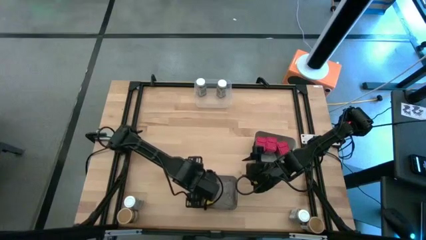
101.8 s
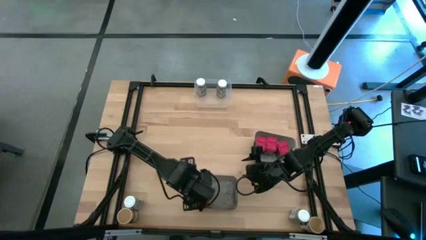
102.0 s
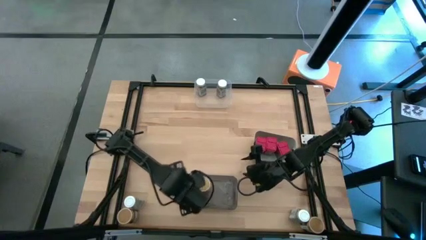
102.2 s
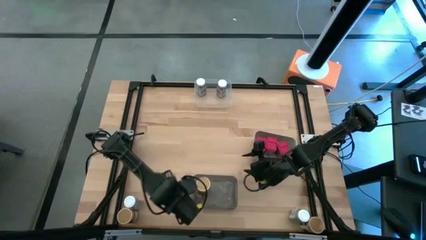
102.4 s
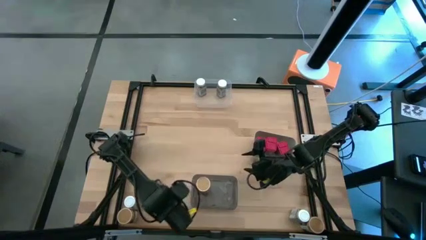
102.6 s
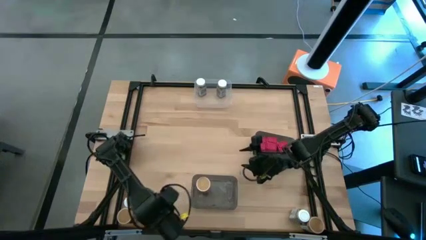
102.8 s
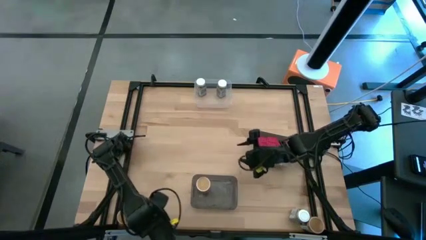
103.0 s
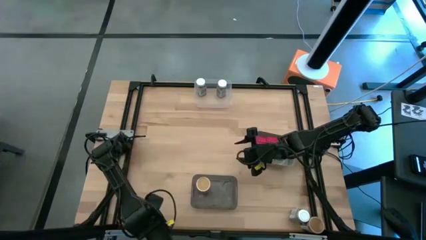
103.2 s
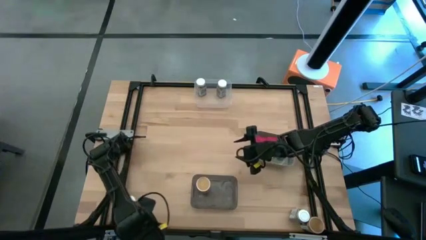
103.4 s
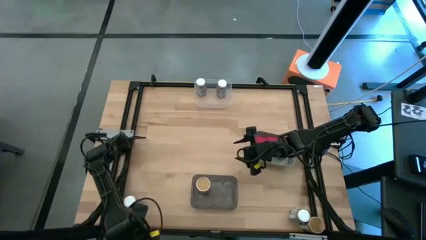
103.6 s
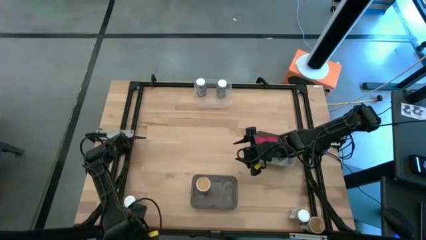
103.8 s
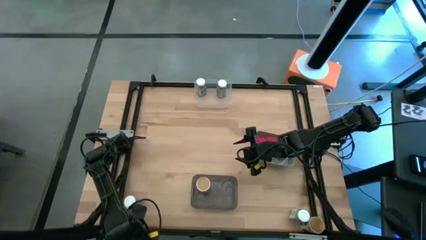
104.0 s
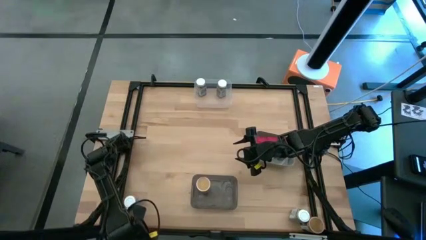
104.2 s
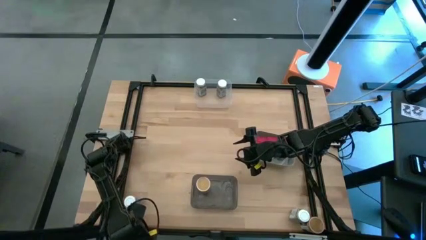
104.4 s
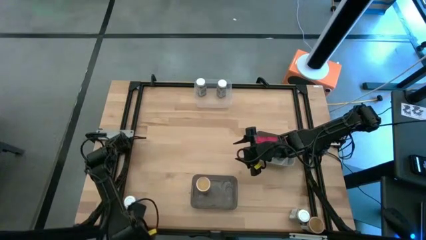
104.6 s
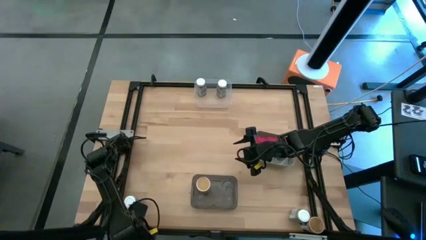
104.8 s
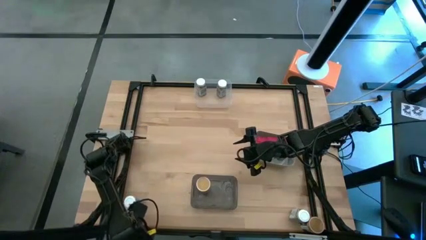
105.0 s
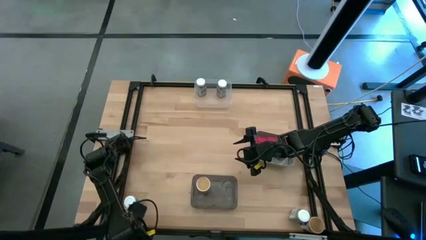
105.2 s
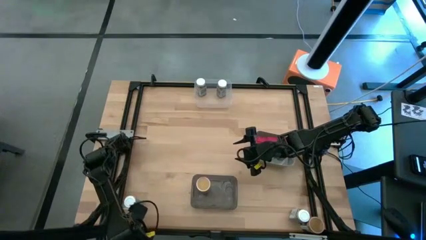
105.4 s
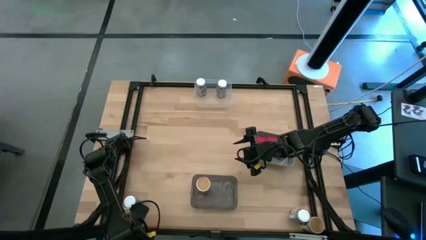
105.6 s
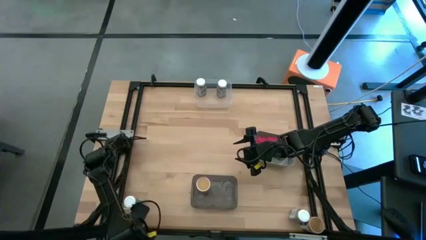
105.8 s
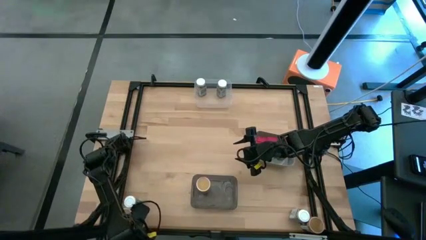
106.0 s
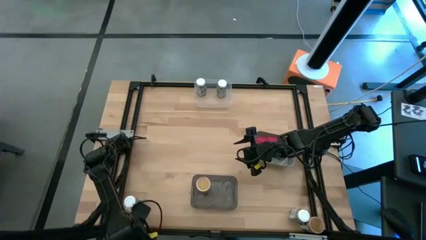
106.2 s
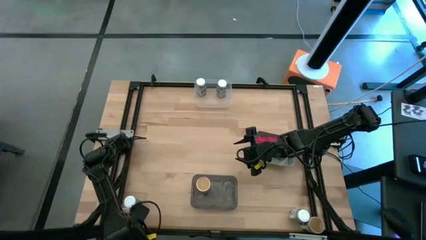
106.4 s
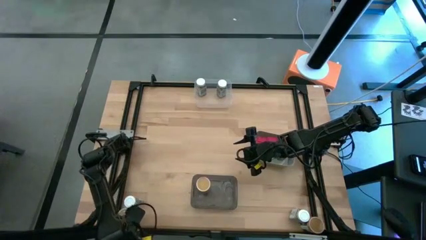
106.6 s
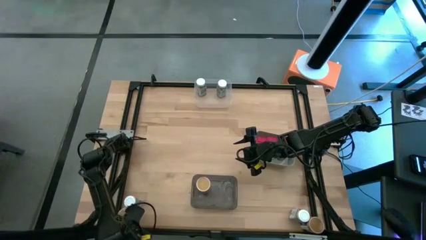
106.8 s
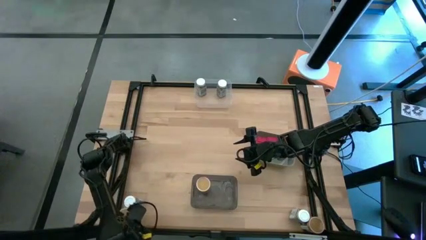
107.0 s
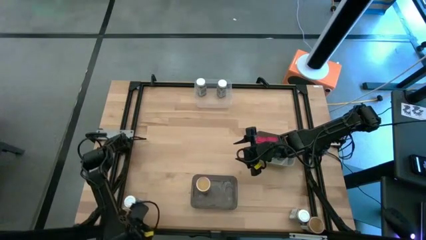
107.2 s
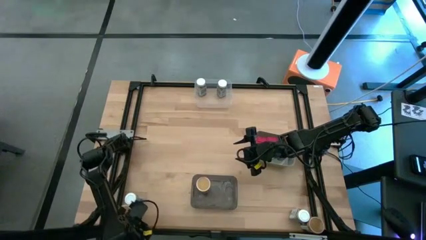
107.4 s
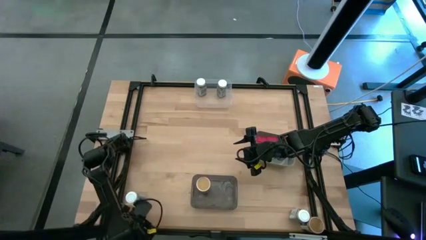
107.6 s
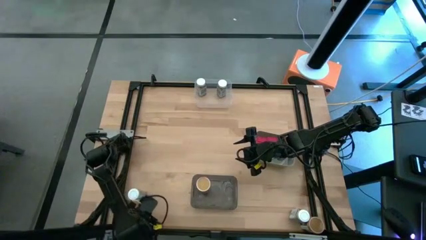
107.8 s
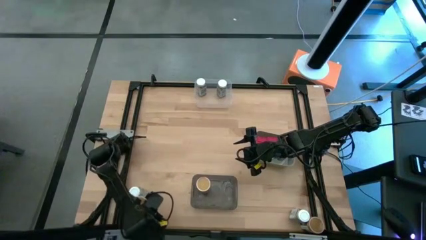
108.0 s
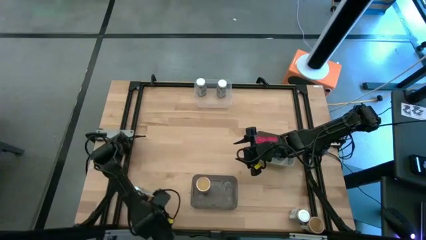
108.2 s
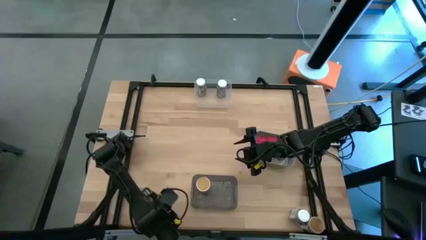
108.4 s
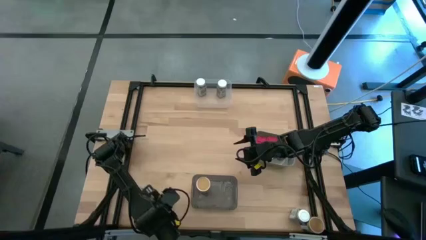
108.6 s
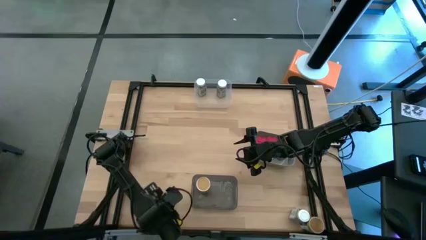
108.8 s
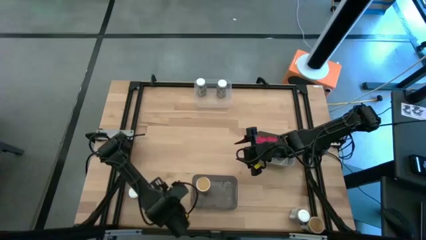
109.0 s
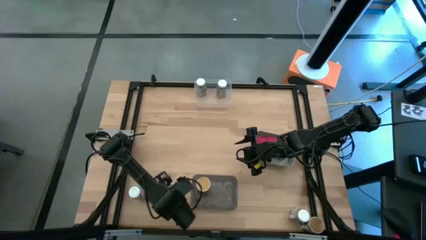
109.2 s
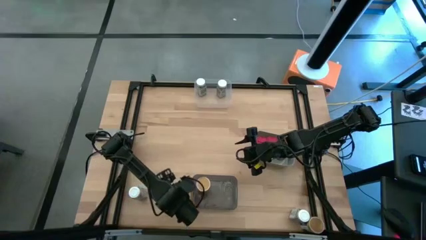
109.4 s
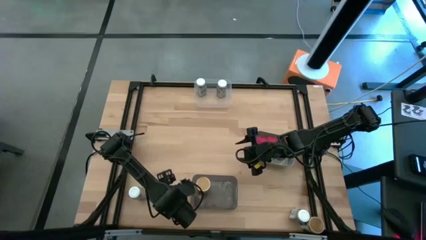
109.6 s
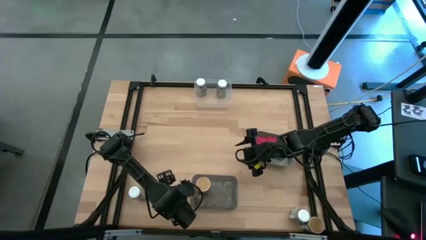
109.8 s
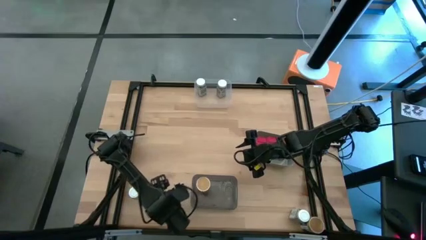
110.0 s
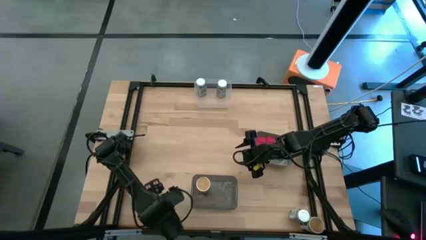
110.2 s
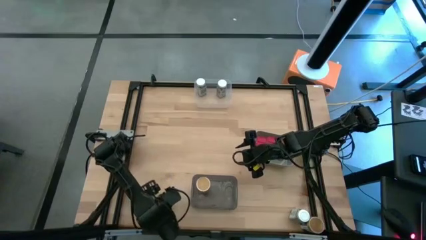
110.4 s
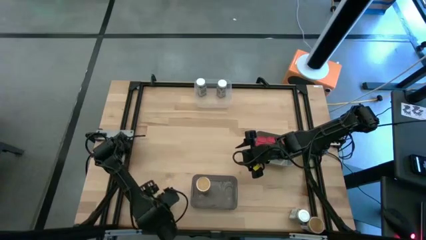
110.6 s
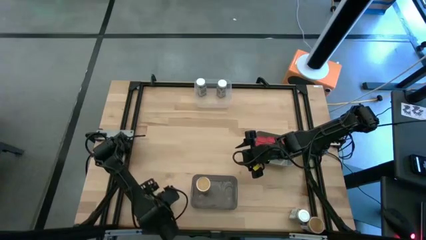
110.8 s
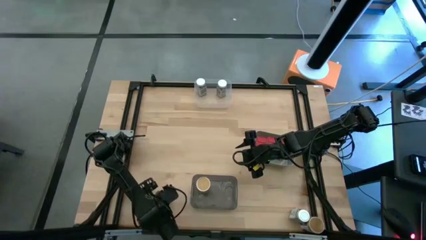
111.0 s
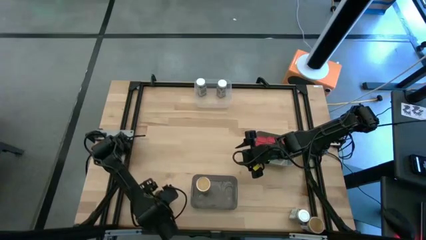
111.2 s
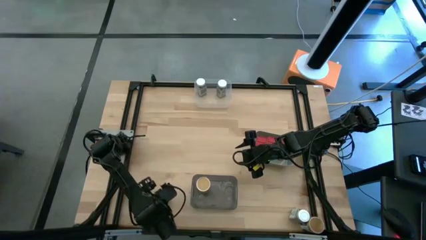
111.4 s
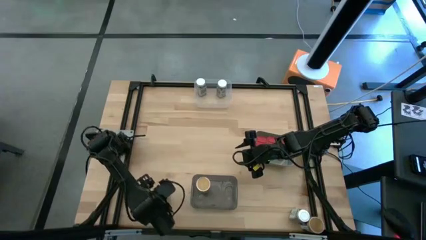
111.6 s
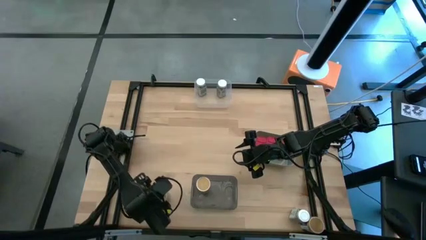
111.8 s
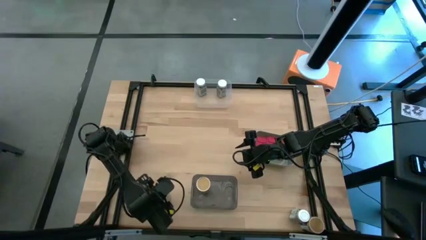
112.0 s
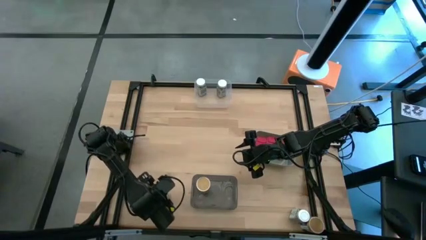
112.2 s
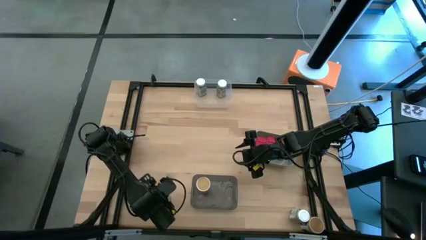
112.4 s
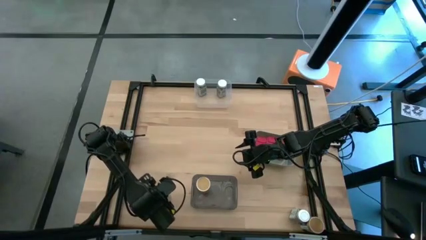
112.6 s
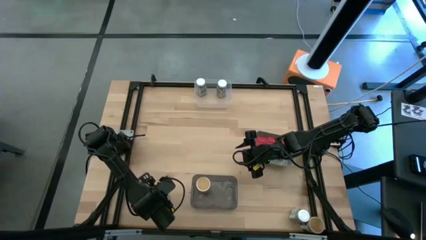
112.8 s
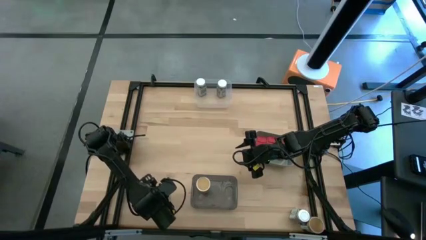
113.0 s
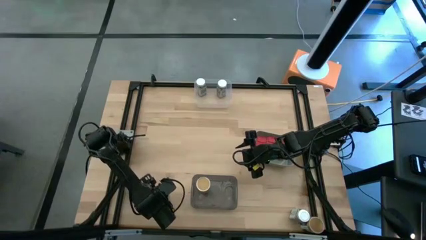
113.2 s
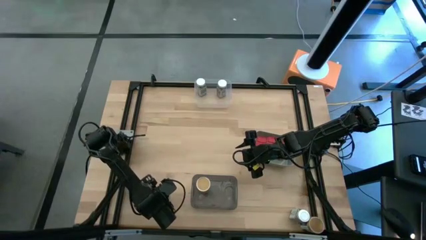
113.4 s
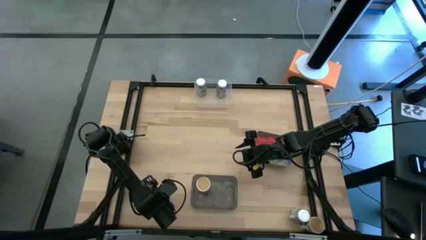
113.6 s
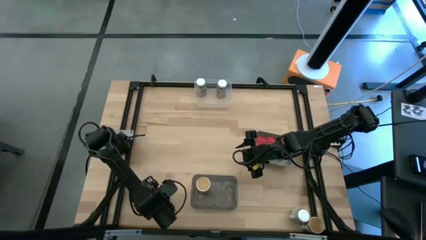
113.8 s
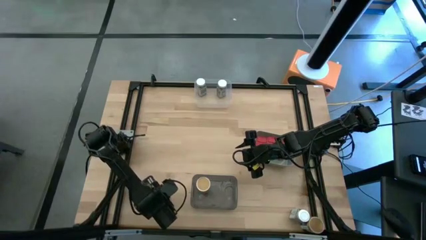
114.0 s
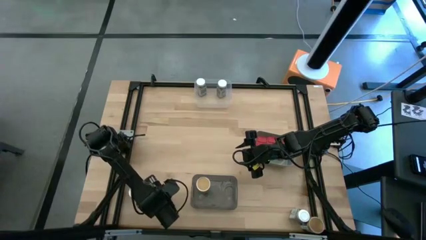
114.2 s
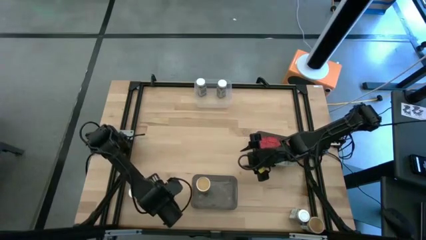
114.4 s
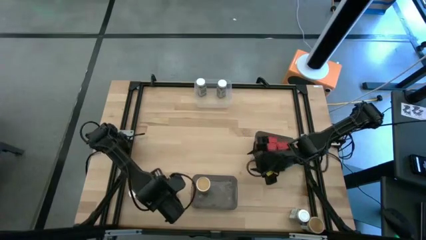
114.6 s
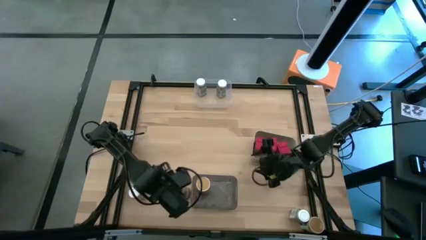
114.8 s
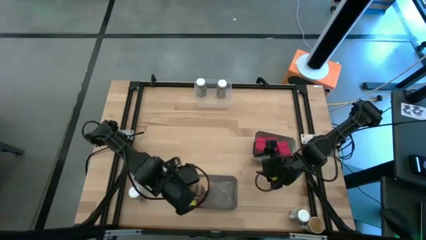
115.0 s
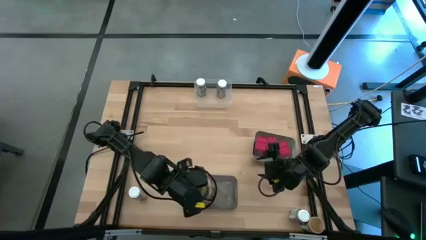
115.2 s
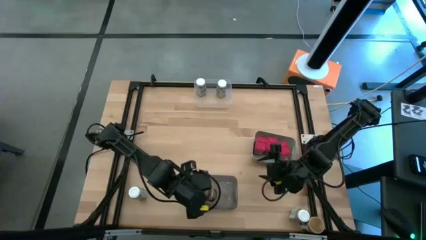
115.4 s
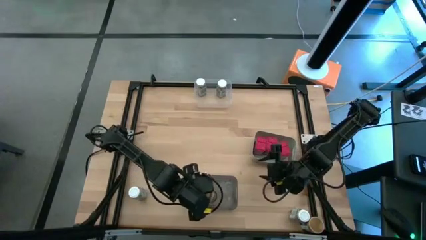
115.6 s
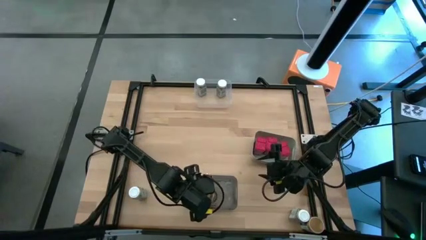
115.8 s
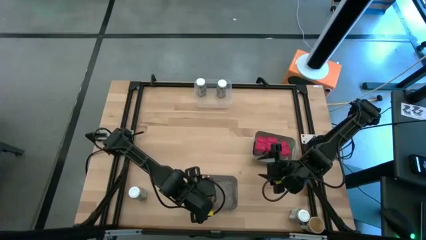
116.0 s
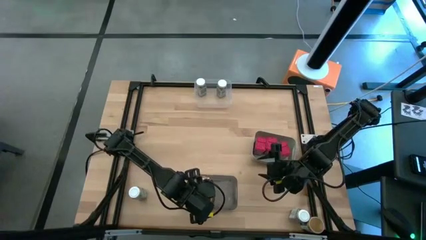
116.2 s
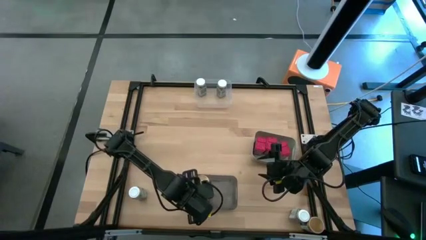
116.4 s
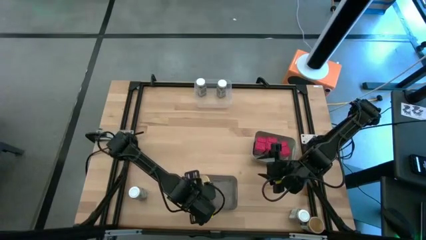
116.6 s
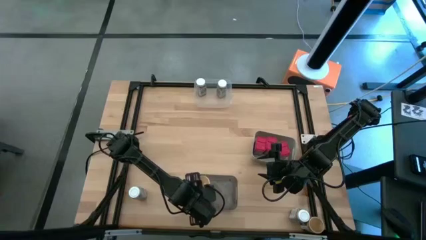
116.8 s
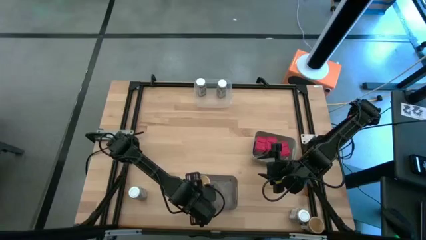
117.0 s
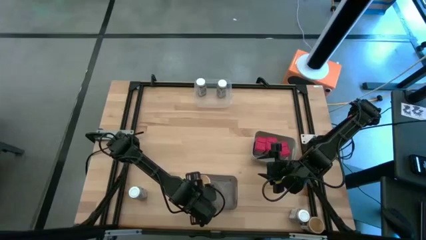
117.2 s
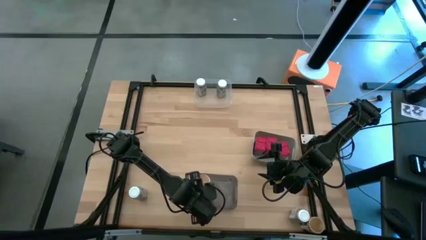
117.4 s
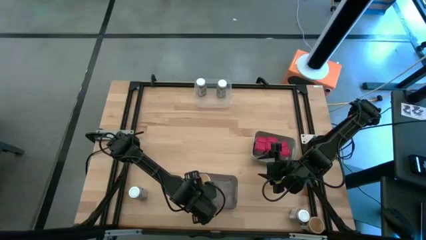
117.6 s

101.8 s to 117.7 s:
Task: Sort spices by type
Put the gold seasoning bottle into the black bin
